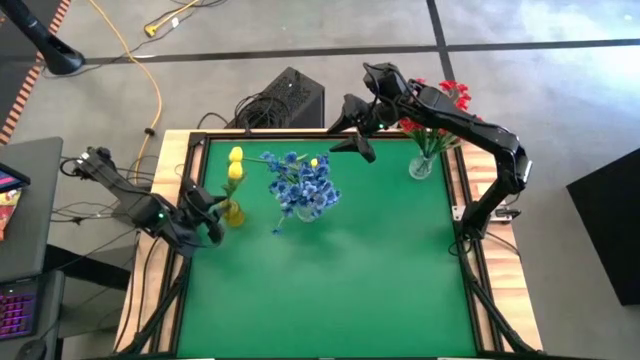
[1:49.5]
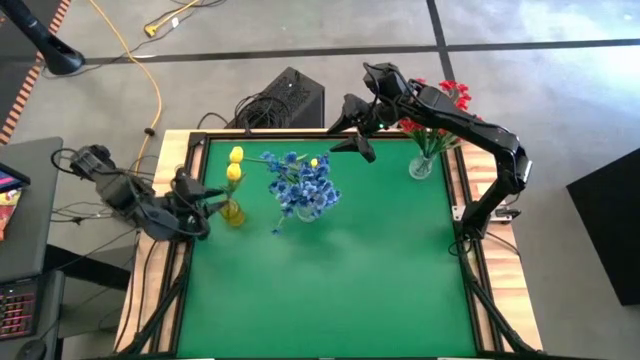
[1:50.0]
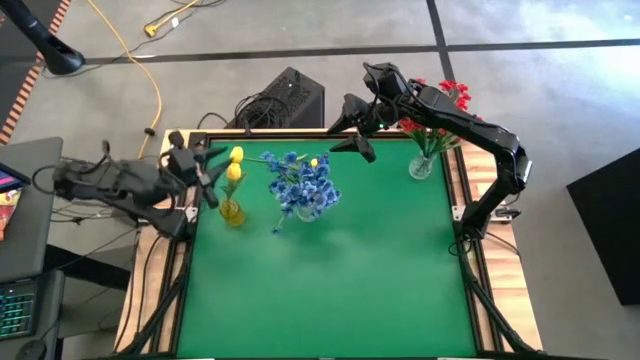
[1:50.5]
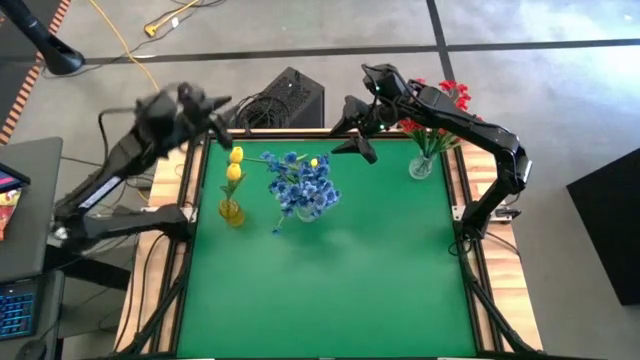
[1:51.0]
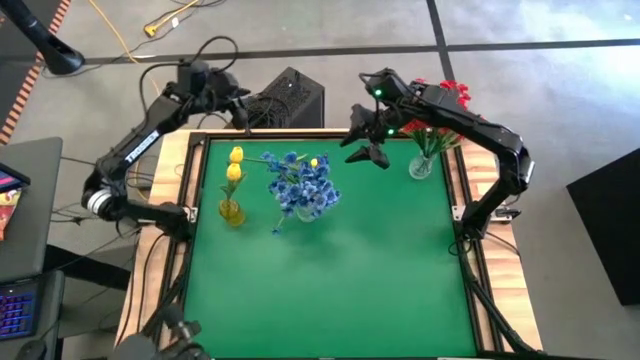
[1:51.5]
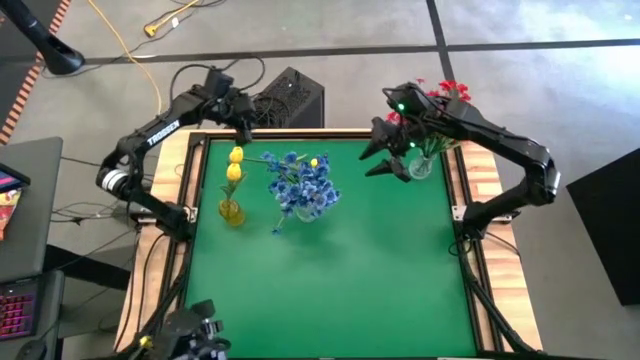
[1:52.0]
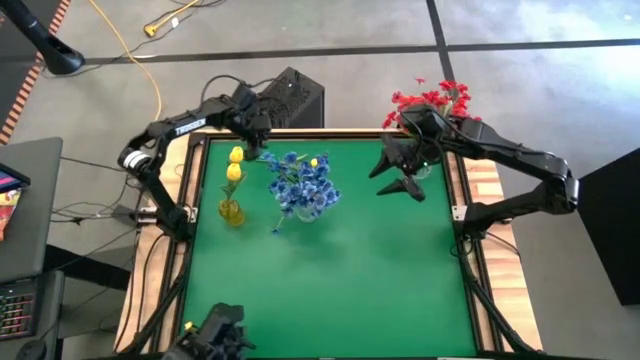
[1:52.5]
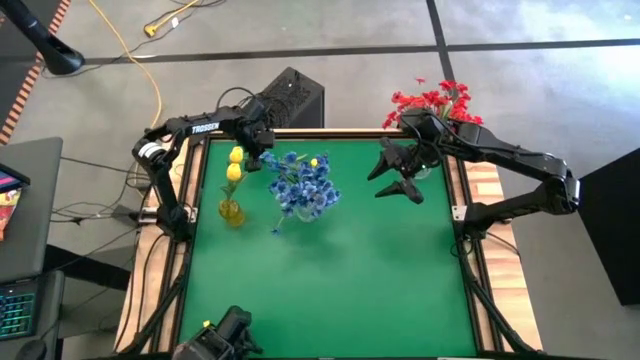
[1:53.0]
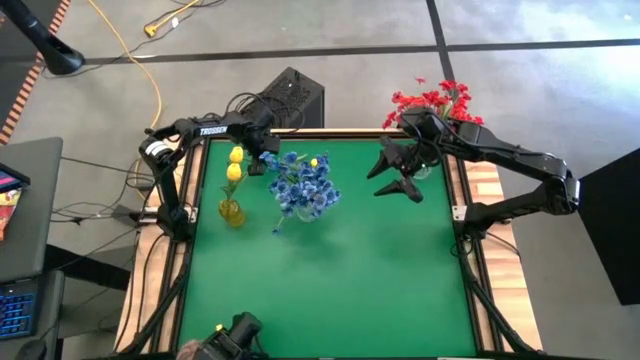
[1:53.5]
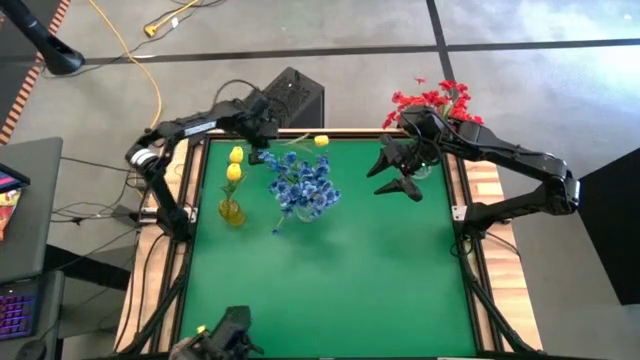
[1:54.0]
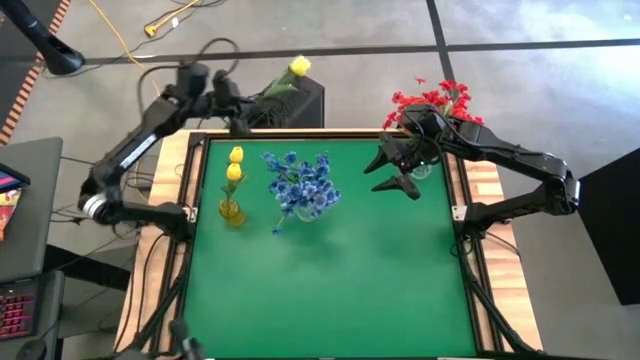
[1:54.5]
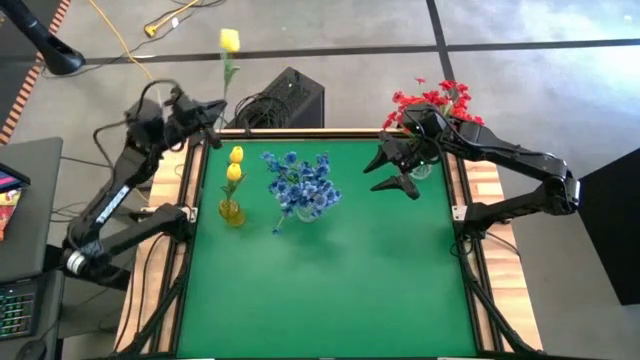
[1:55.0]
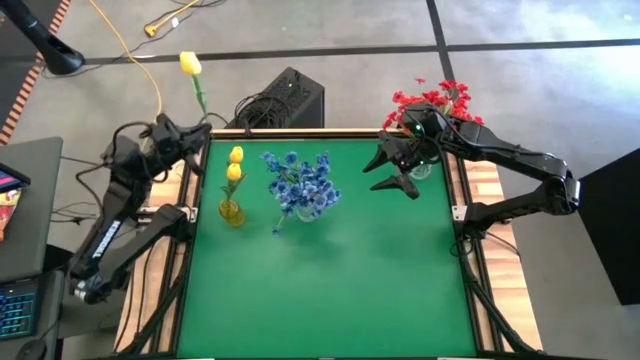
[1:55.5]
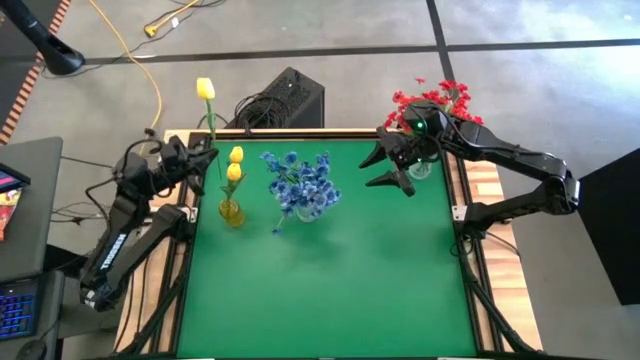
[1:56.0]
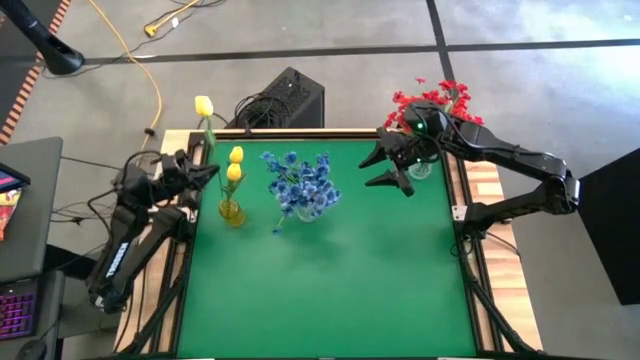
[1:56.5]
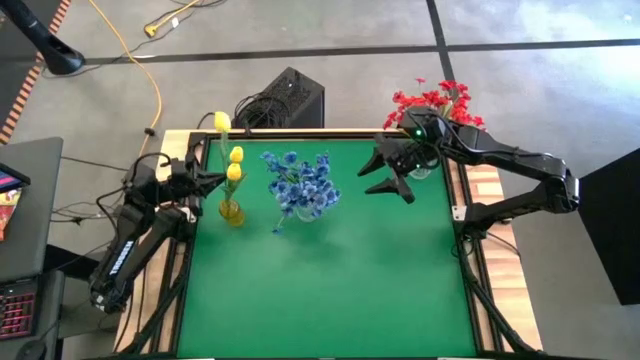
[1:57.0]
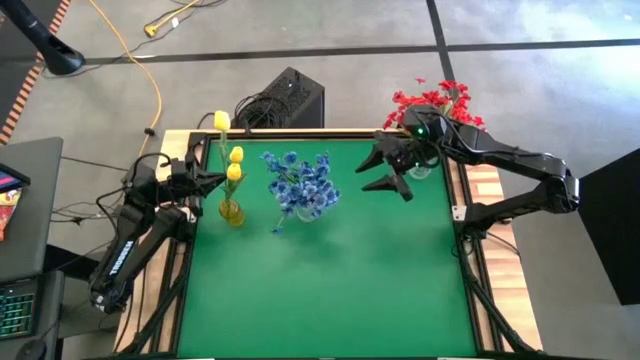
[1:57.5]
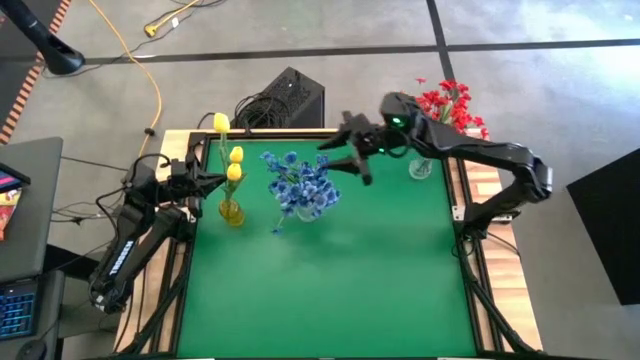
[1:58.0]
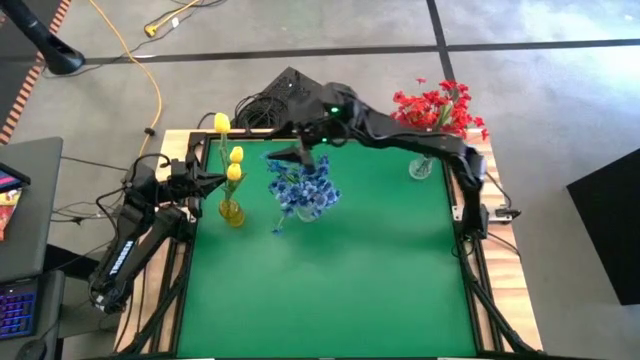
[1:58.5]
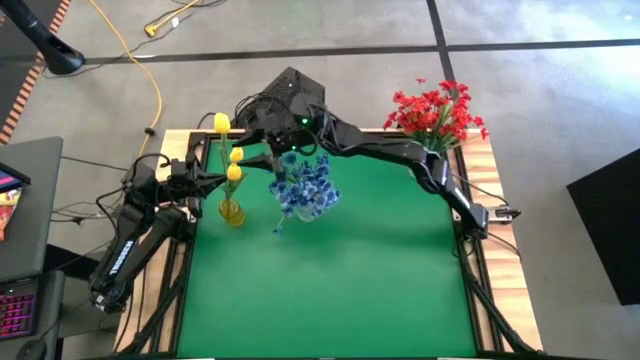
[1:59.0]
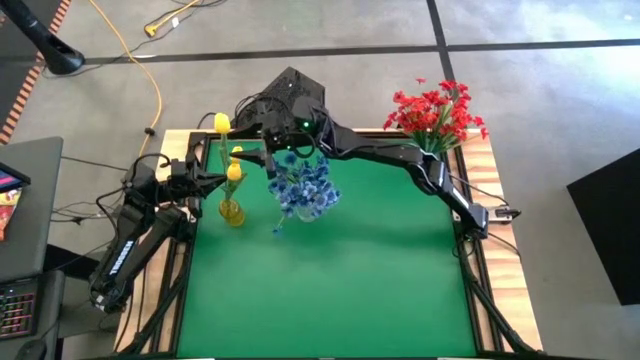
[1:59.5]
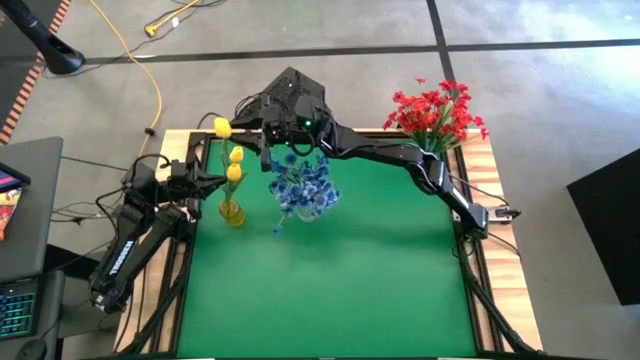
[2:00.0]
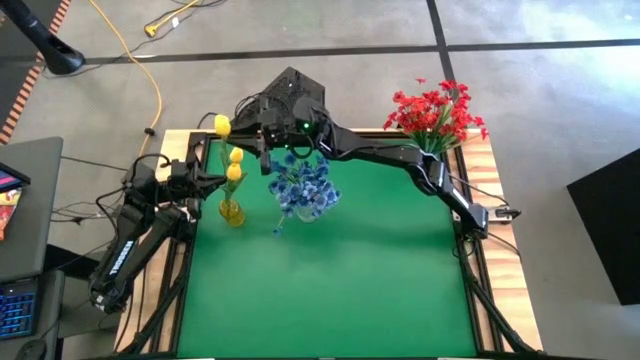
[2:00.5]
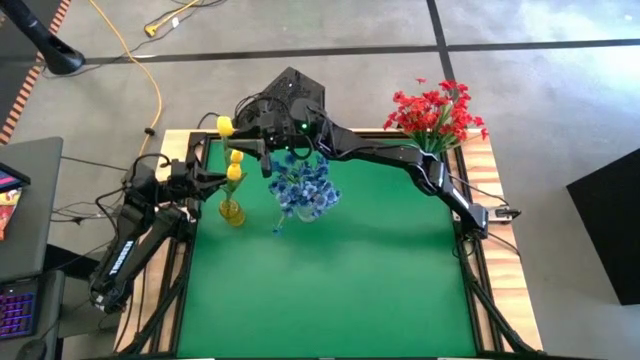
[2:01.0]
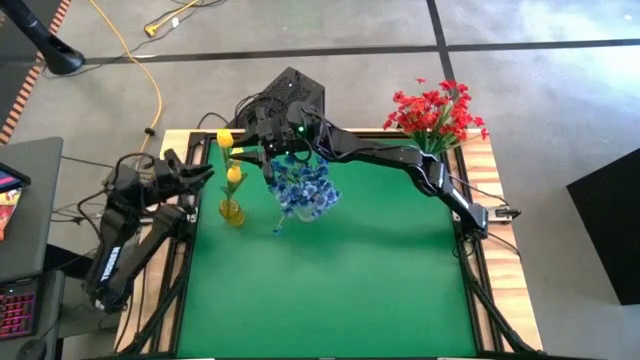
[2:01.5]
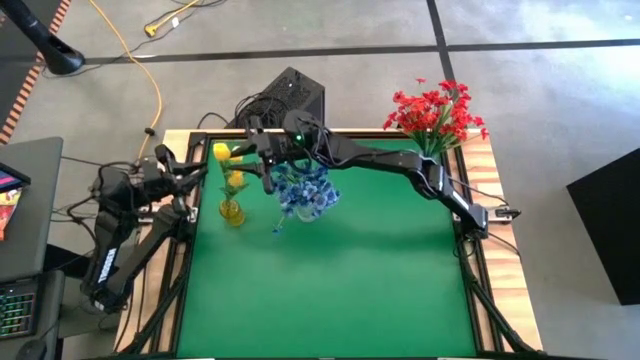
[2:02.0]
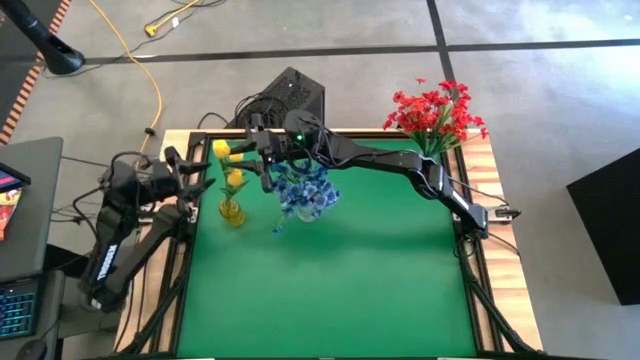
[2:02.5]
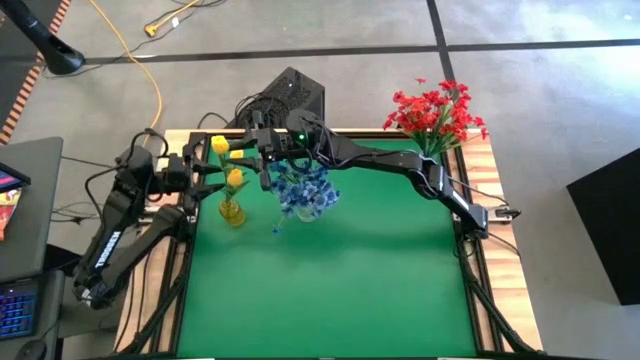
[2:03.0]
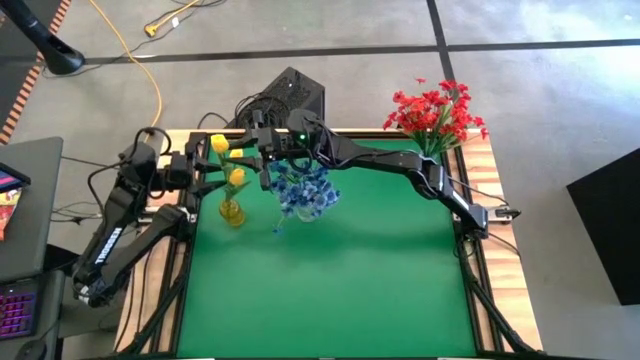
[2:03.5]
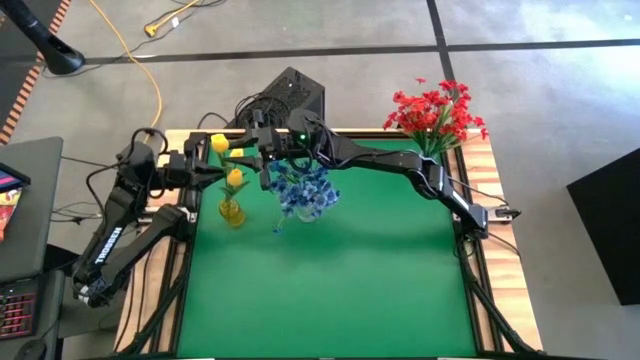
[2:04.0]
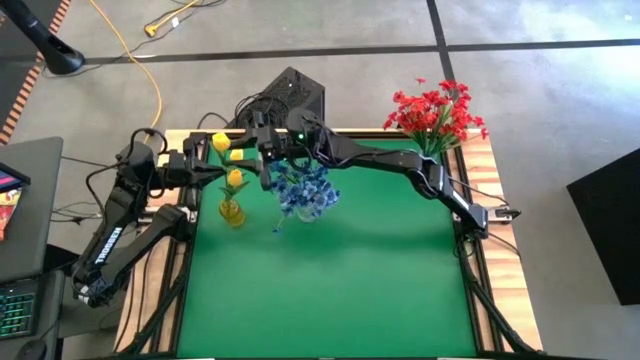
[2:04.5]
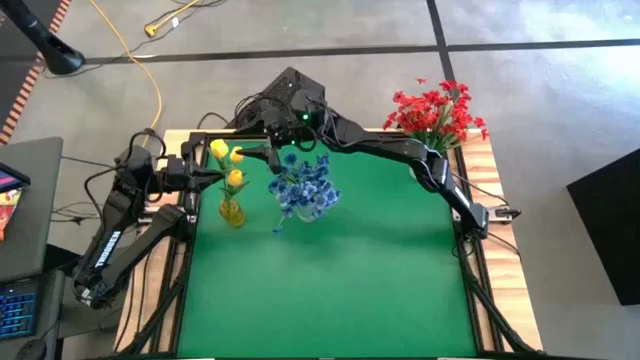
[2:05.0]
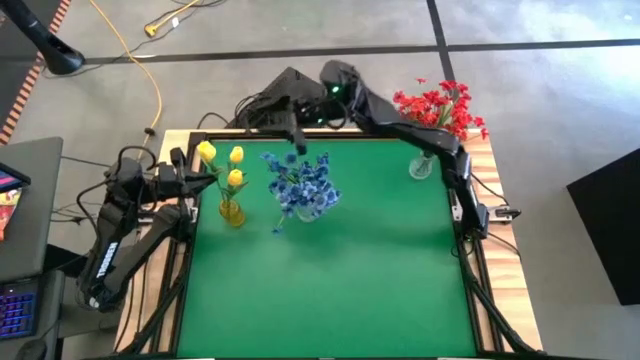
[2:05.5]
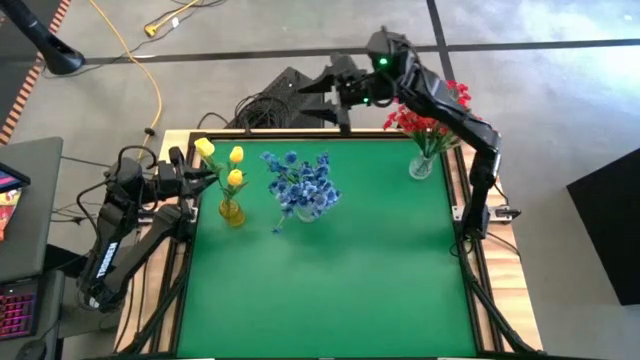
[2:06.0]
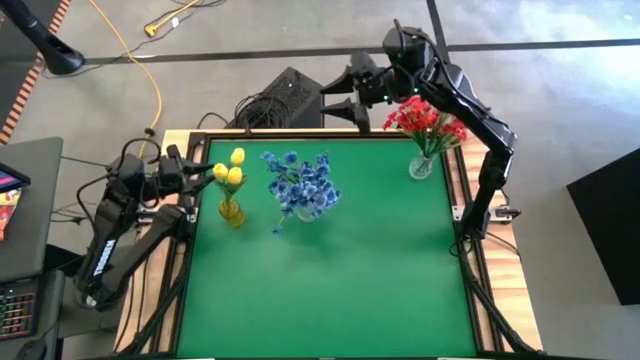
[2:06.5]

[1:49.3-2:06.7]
Task: Sort flowers into vase by color
Put the yellow tulip into the yellow vase

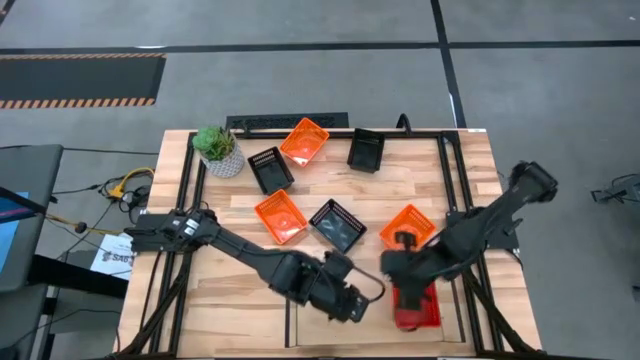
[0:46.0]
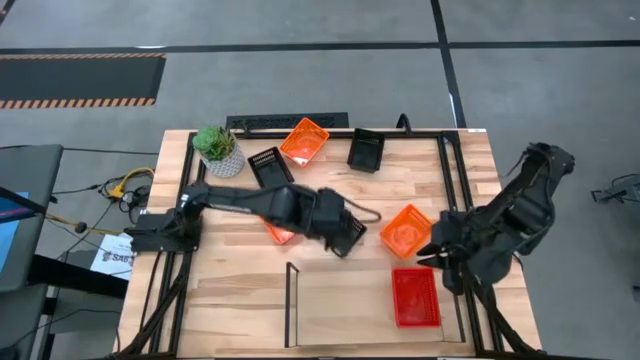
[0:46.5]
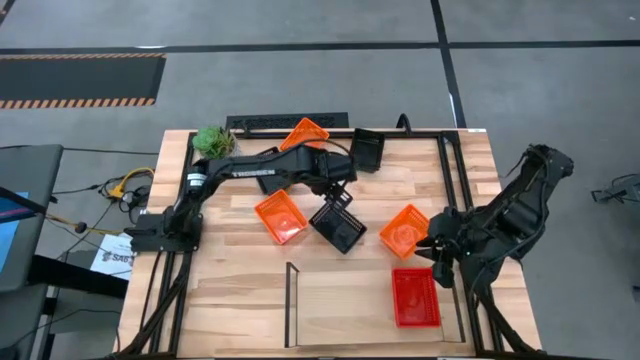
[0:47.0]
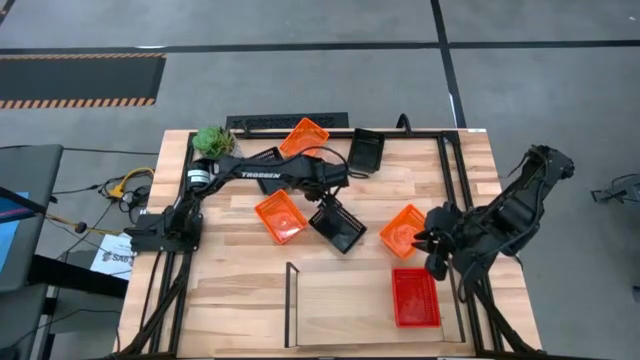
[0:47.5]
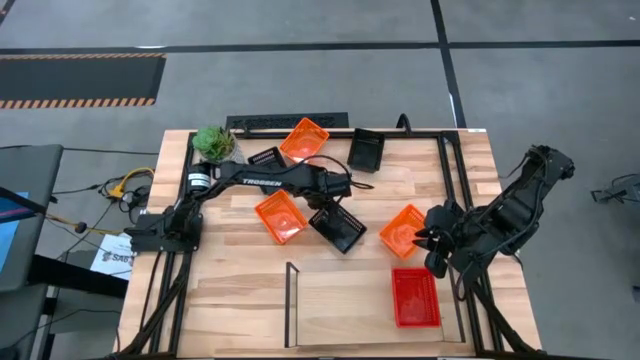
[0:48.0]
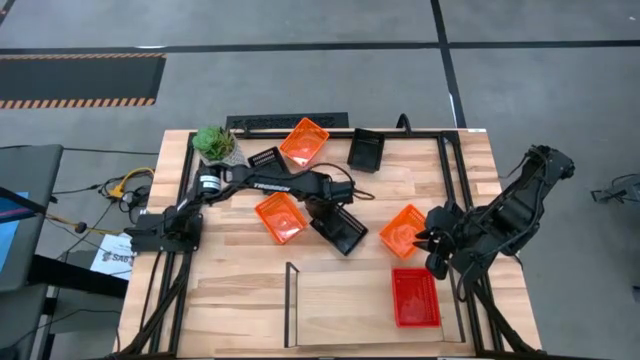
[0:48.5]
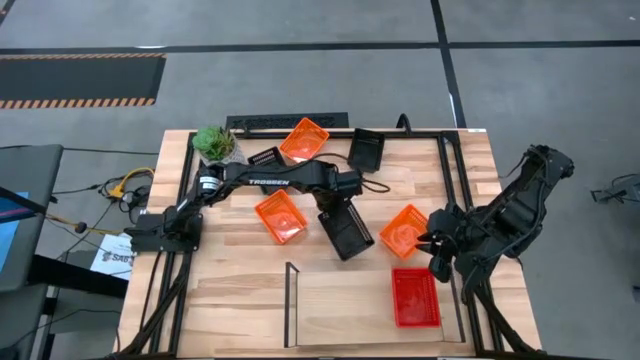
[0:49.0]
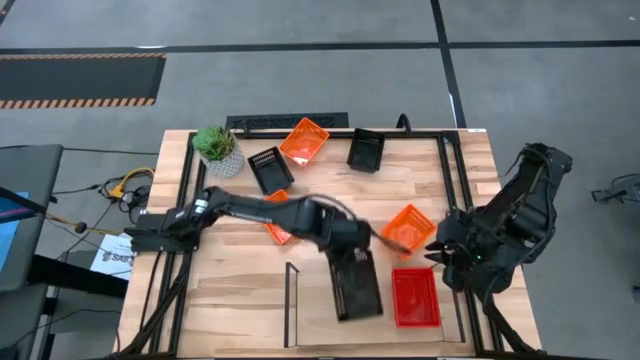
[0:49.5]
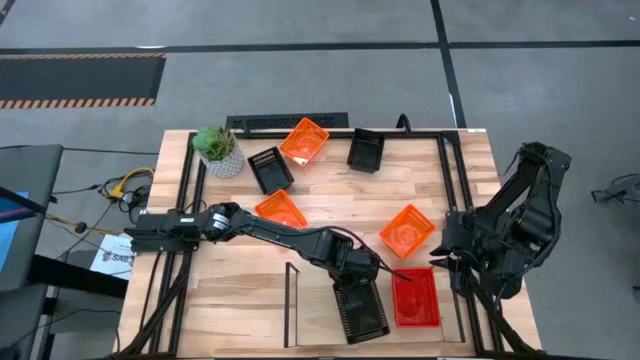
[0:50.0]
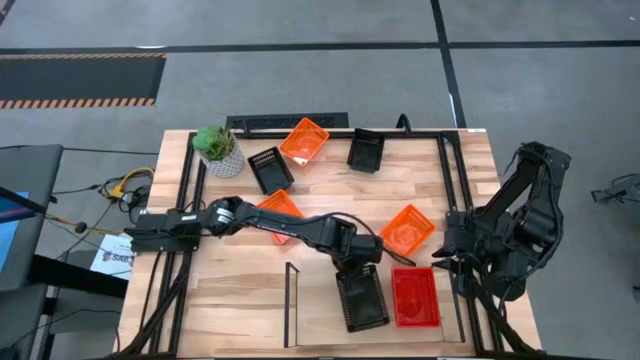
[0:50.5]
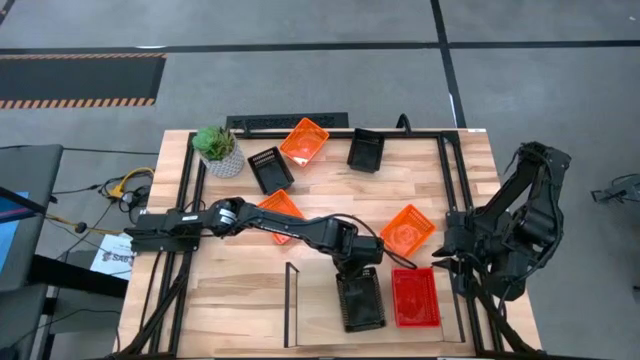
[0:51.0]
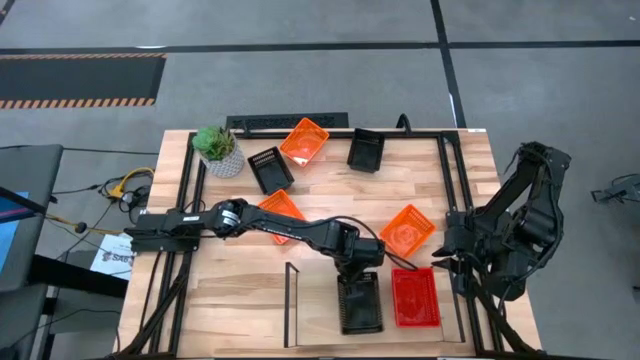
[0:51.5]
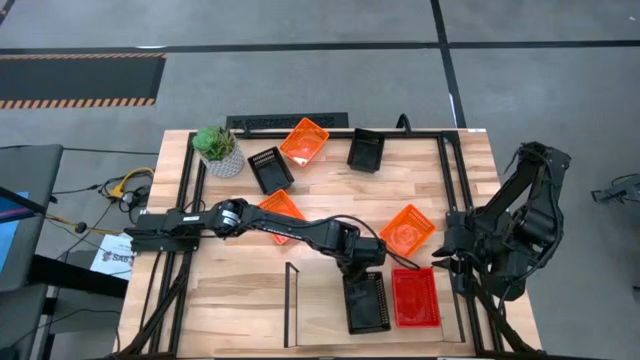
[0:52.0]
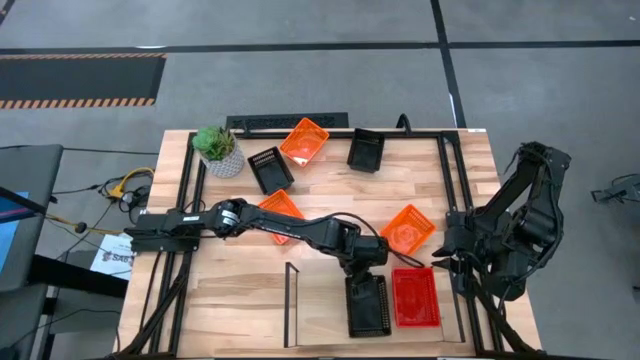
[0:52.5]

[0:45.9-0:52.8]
Task: Stack baskets on shelf by color
Put the bottom right black bin on the shelf
